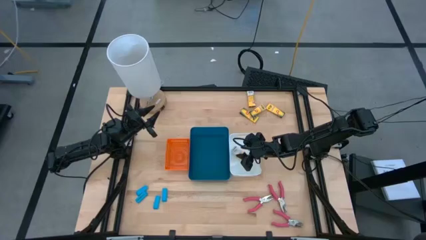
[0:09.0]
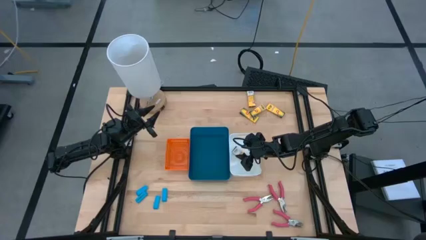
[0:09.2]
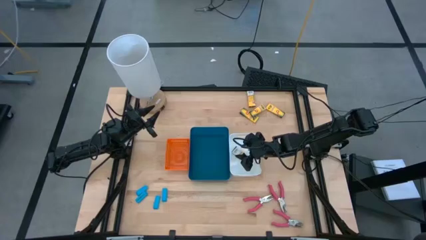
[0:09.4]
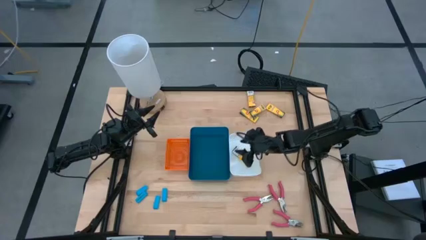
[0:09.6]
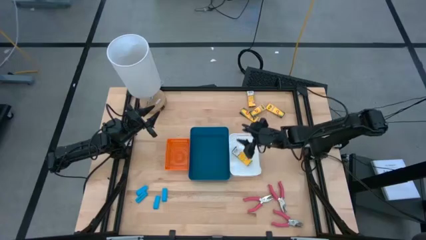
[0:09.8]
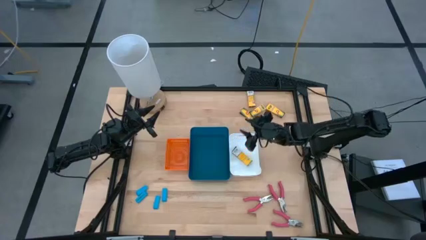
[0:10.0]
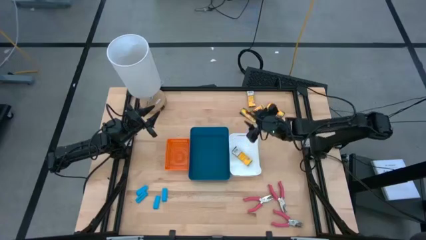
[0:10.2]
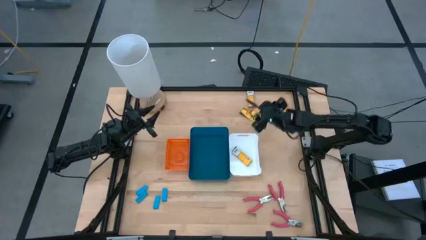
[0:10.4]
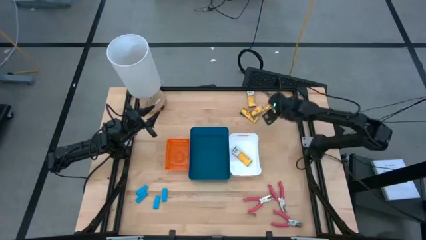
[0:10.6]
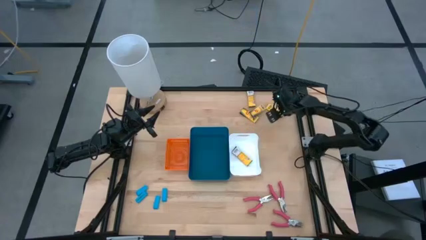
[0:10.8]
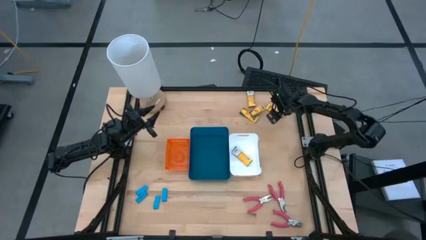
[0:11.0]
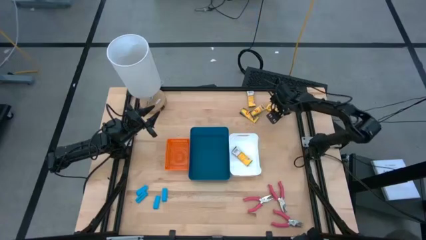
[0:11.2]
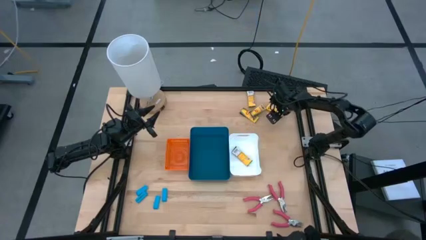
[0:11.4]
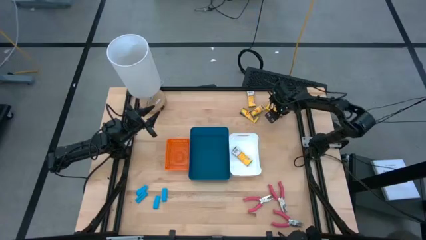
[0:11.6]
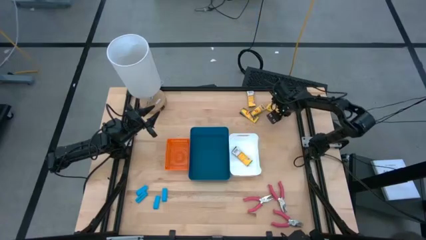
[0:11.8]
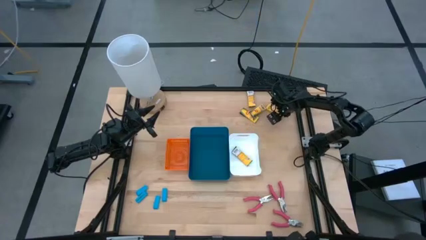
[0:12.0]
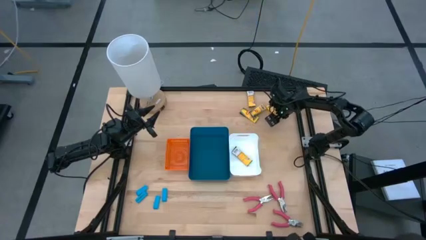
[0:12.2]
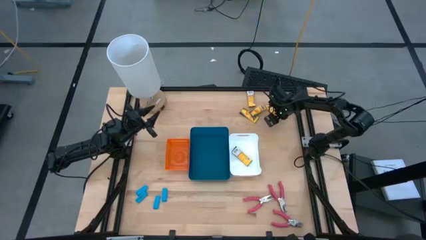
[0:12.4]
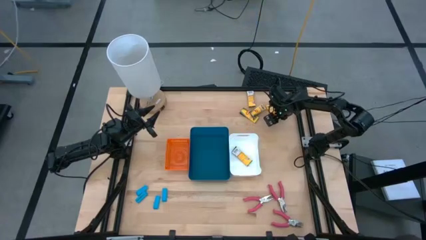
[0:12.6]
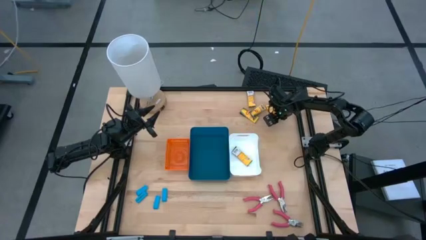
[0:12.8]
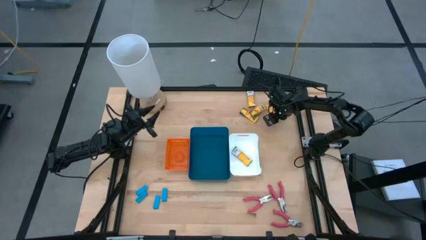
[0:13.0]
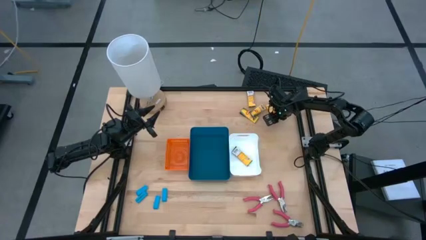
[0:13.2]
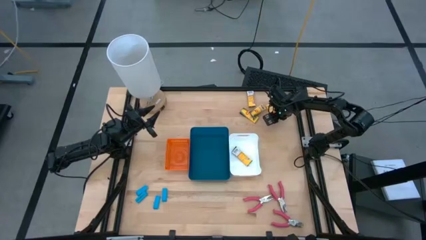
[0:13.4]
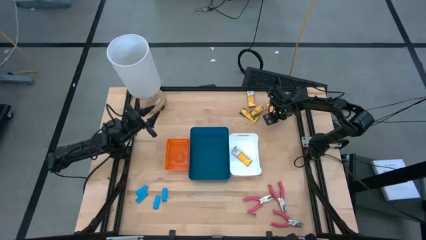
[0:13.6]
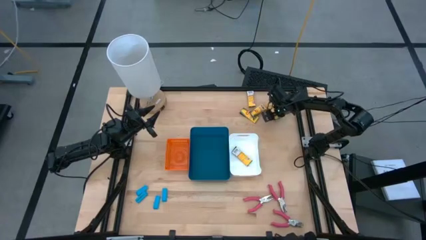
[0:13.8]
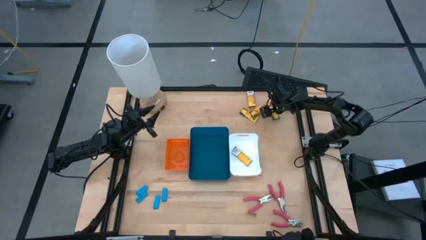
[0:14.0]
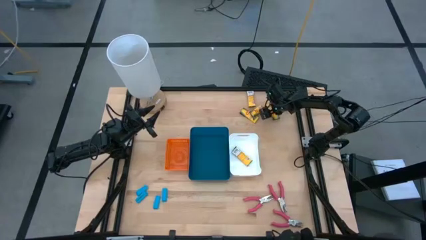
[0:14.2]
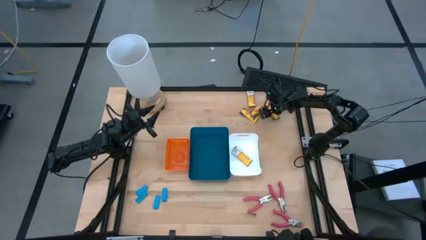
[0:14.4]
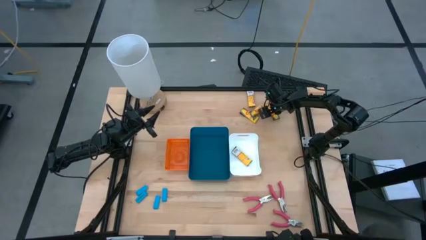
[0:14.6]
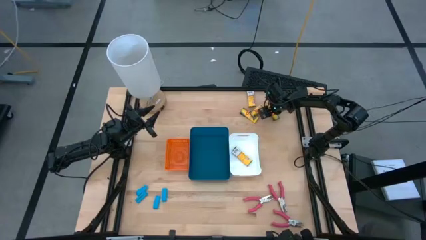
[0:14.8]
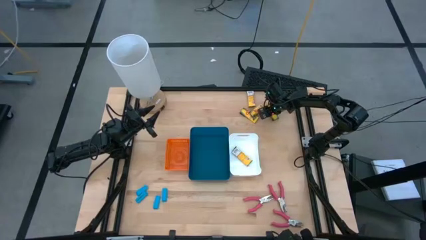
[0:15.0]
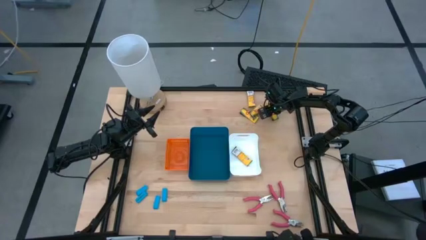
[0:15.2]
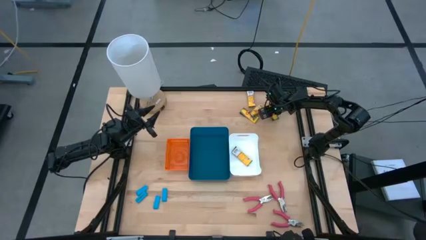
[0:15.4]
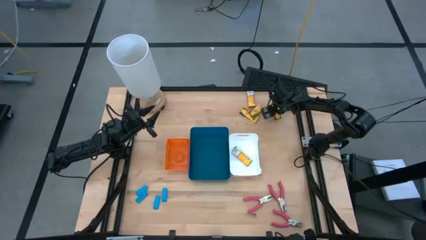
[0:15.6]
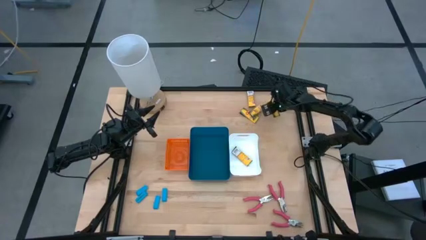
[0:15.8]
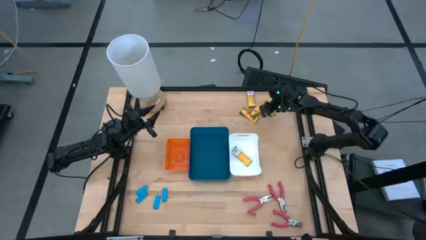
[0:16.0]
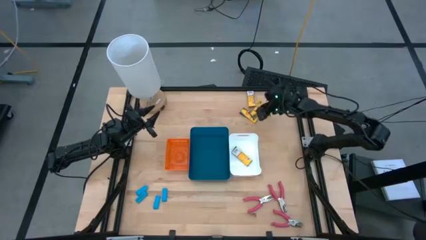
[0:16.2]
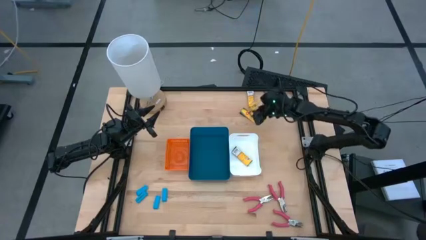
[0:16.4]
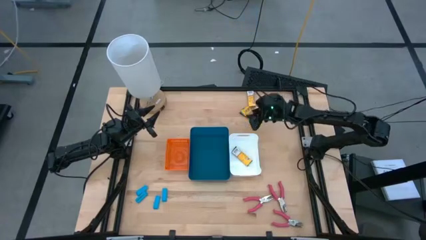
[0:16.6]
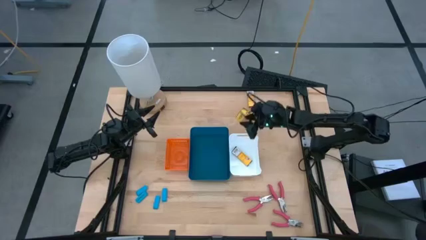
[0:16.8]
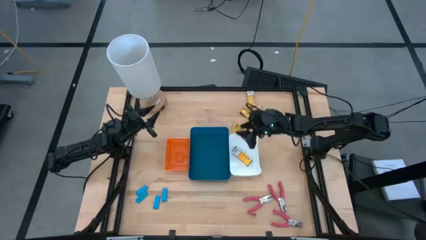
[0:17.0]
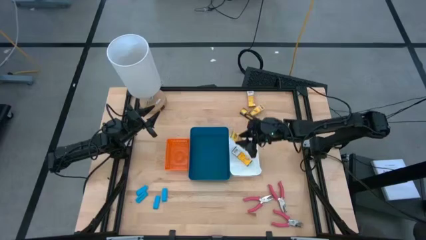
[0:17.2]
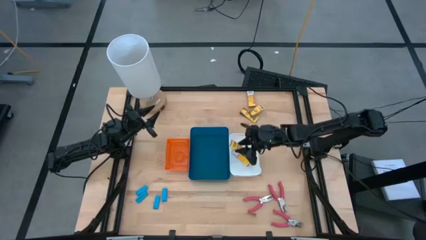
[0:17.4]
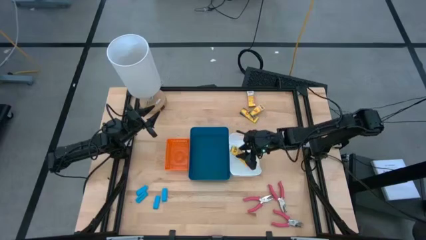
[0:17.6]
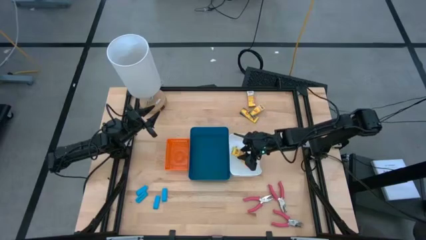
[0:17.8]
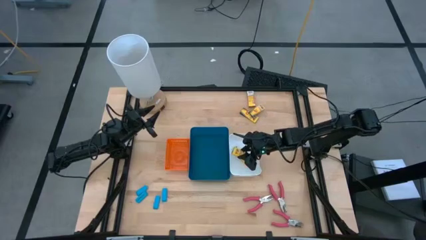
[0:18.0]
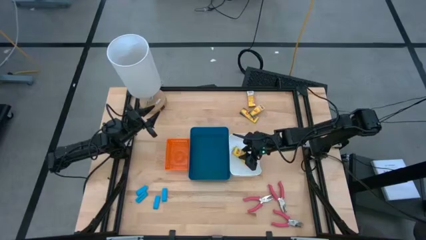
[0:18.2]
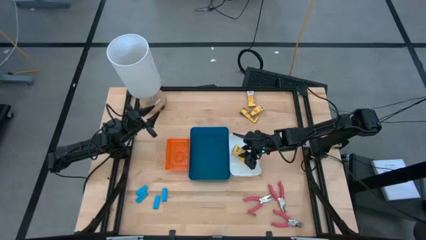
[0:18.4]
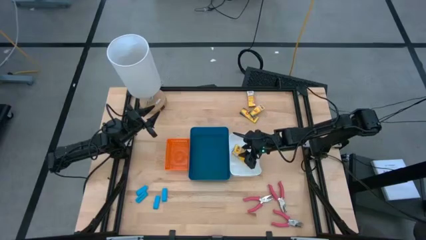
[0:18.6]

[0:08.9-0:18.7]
Task: Pick & Place School Supplies
Put the yellow crayon box into the white bin

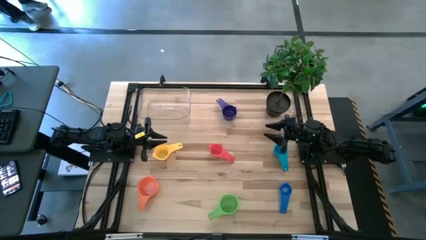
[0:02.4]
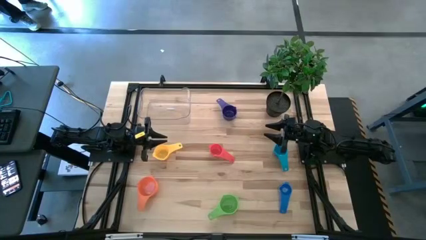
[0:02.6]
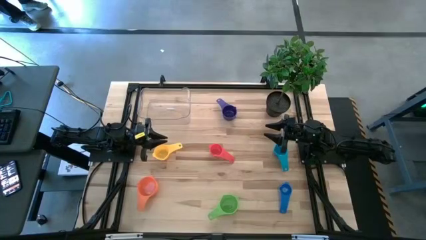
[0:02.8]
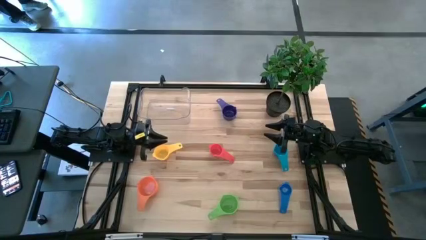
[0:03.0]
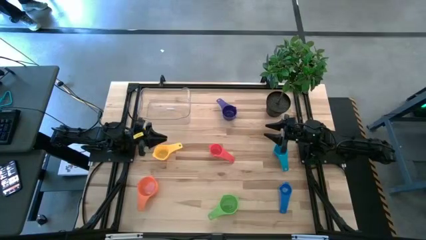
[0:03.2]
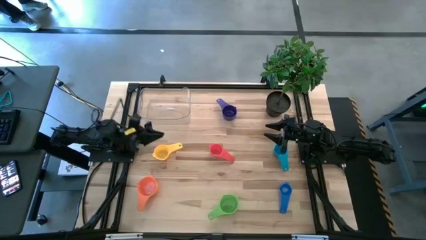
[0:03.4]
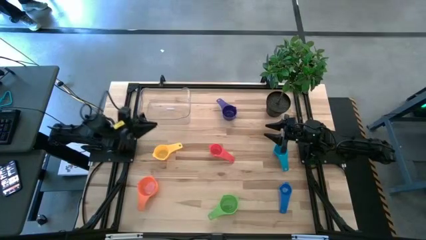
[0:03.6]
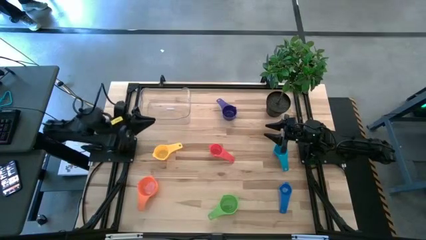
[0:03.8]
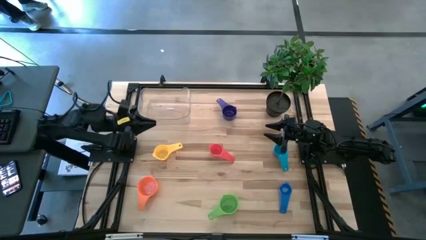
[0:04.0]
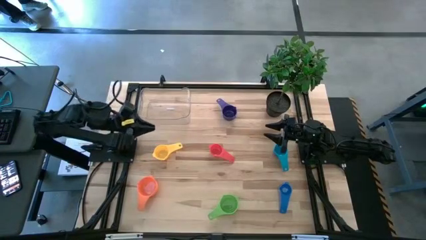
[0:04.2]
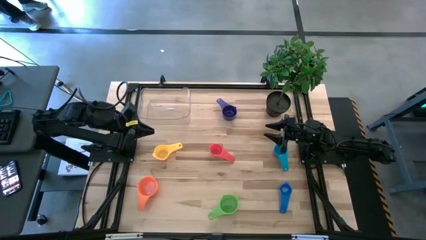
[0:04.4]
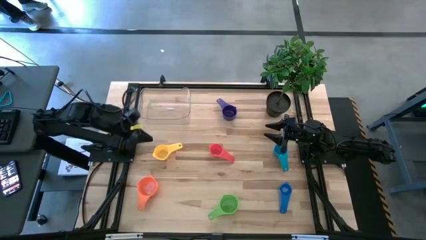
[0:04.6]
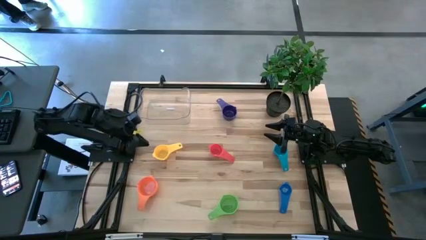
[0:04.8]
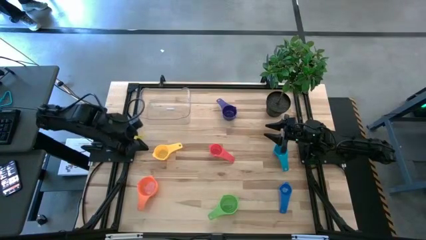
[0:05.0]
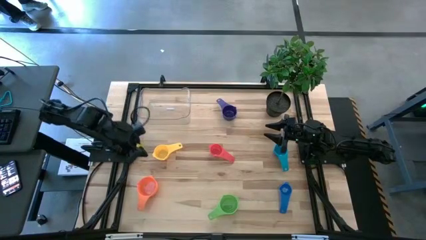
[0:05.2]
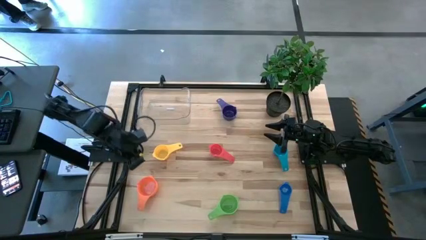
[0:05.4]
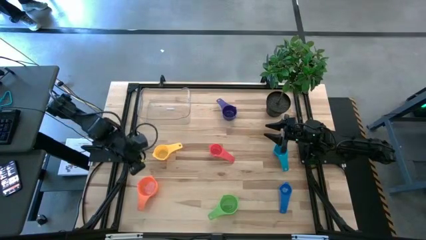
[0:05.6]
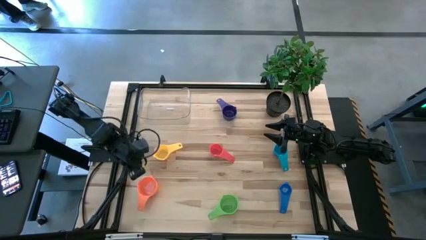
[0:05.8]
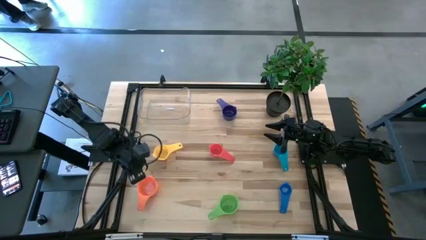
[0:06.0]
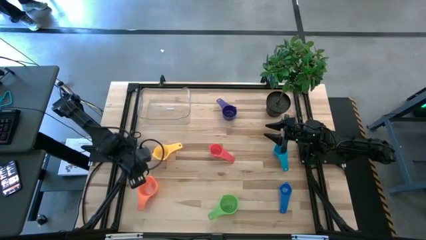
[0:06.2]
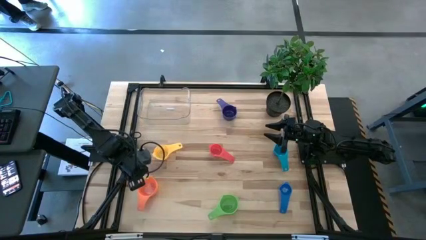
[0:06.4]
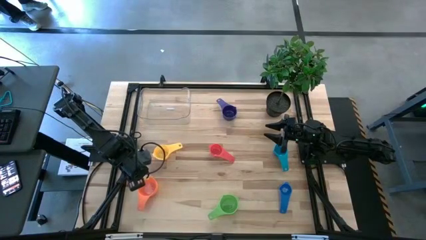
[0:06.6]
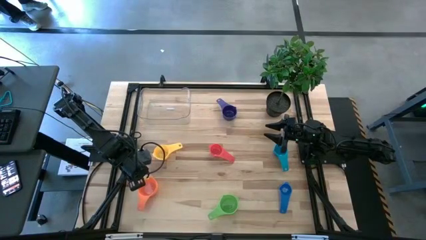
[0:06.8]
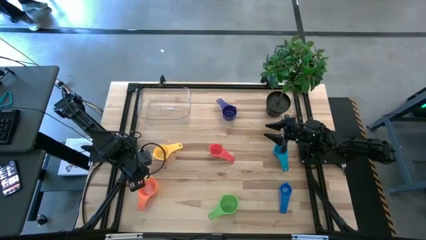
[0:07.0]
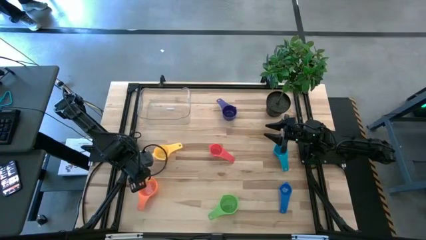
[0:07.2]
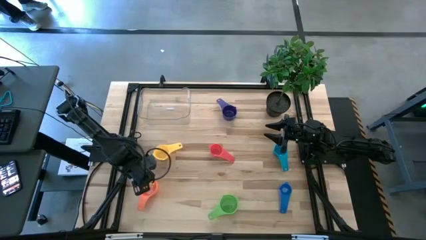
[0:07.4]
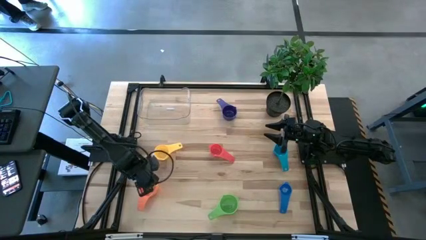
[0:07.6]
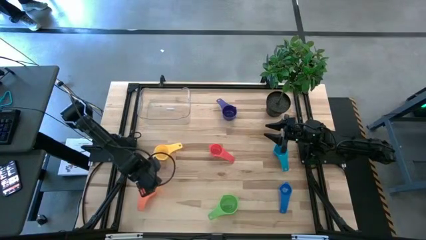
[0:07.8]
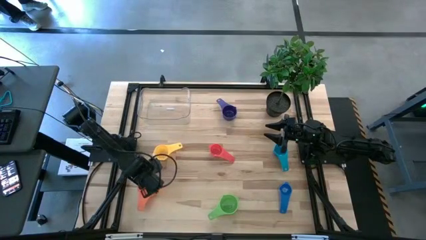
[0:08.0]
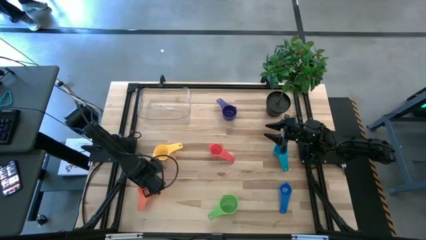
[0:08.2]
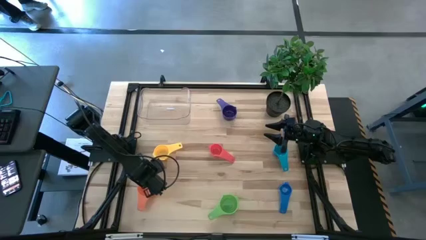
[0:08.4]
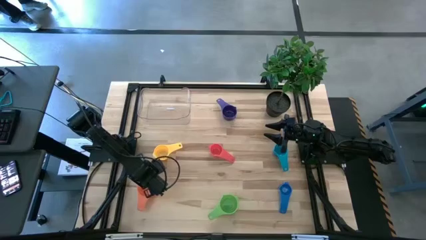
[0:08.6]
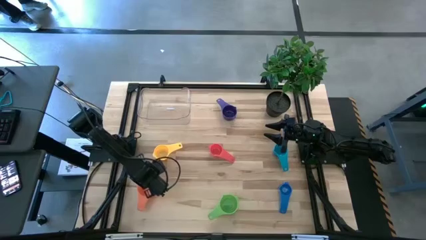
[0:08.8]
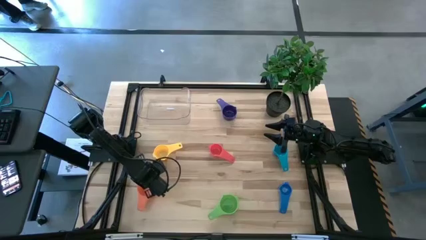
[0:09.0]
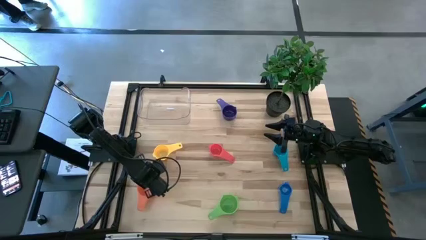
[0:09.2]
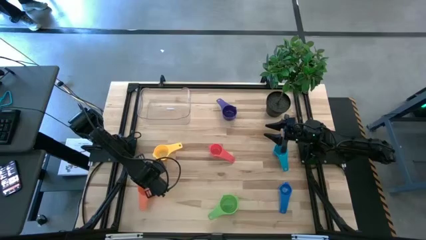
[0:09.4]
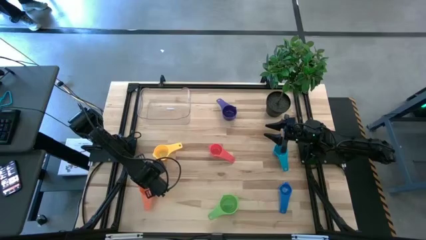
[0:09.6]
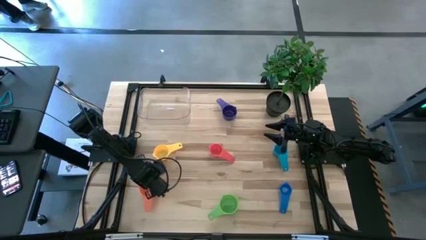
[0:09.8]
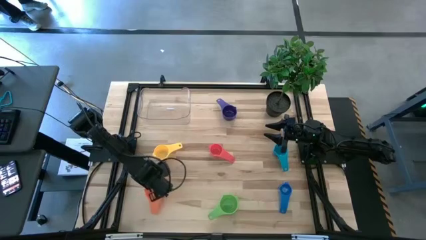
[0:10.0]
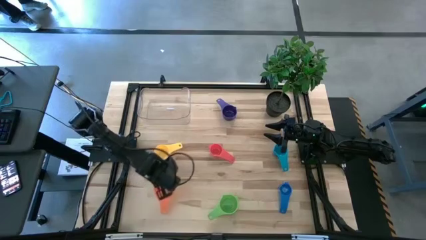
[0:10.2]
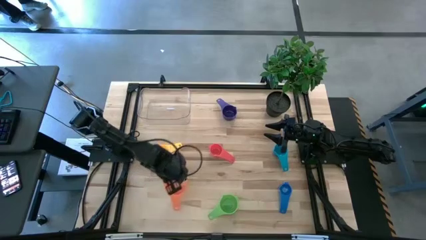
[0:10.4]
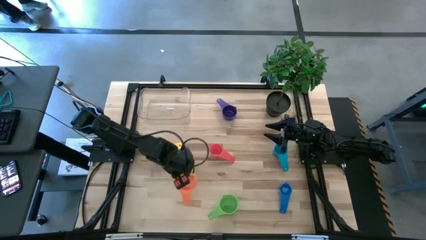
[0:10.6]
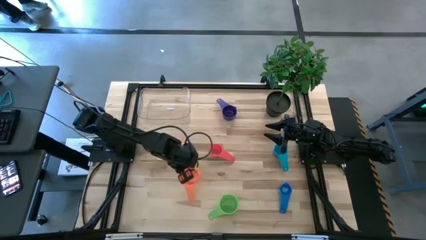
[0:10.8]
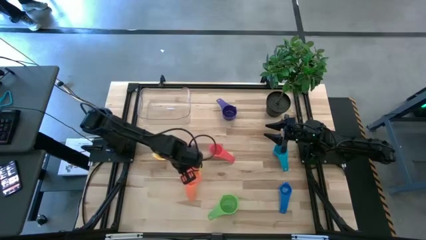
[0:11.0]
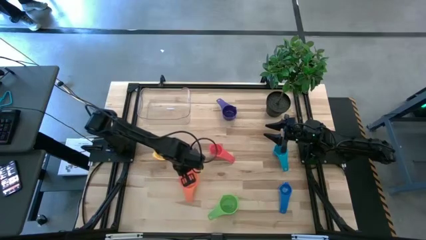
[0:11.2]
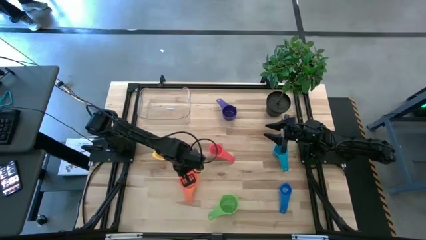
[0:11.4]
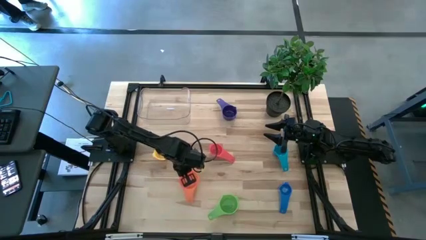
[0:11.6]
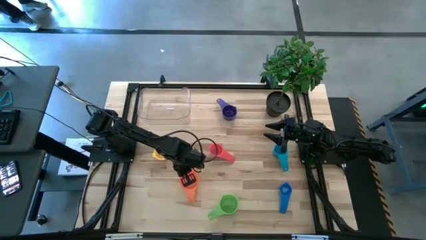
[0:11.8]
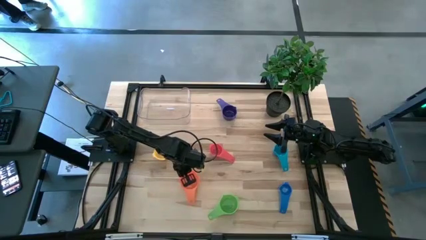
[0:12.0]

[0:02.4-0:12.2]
Task: Nest measuring cups in basket
Move the orange measuring cup to the bottom center of the table
